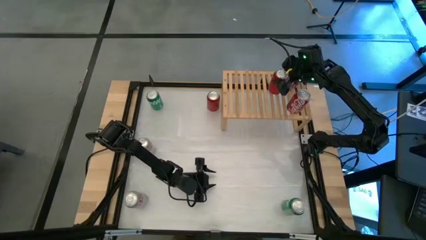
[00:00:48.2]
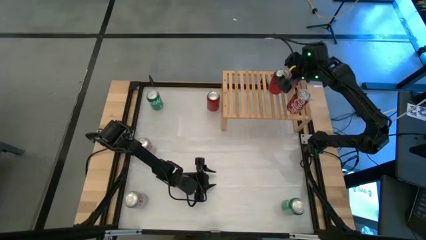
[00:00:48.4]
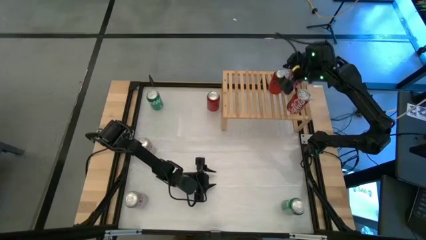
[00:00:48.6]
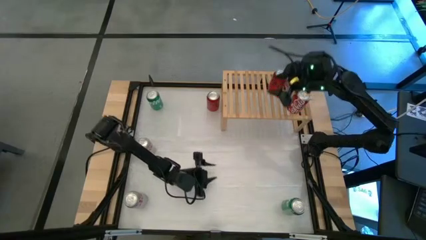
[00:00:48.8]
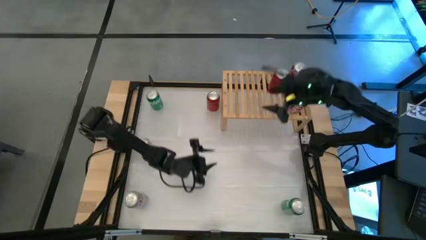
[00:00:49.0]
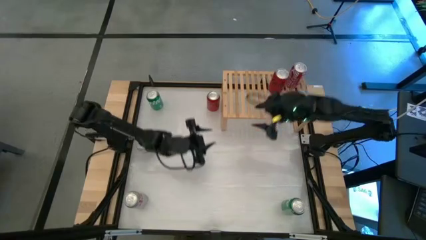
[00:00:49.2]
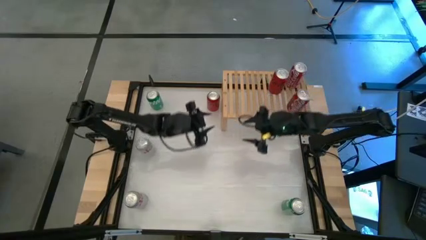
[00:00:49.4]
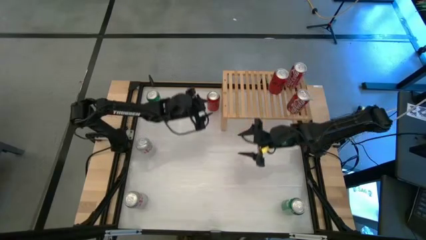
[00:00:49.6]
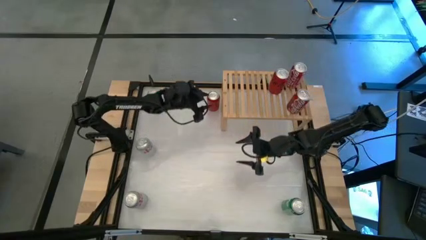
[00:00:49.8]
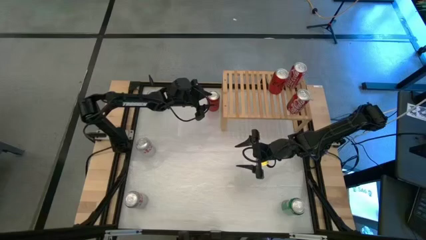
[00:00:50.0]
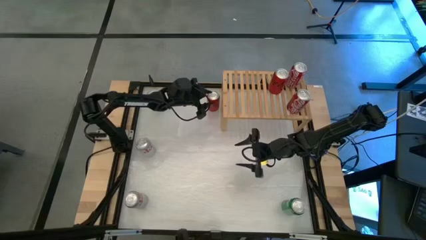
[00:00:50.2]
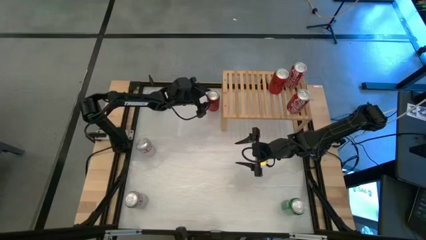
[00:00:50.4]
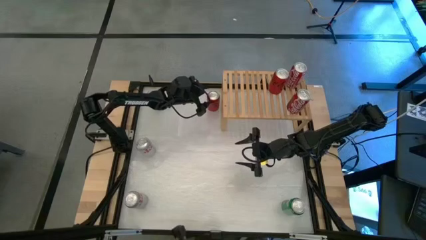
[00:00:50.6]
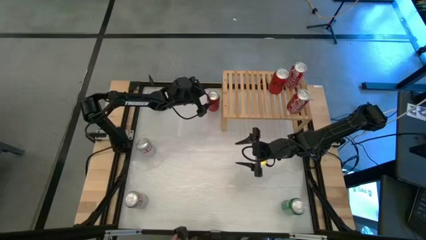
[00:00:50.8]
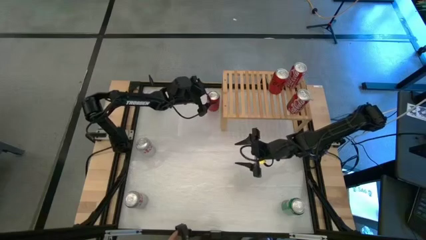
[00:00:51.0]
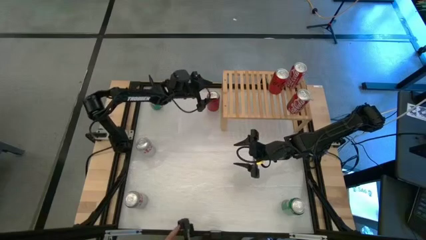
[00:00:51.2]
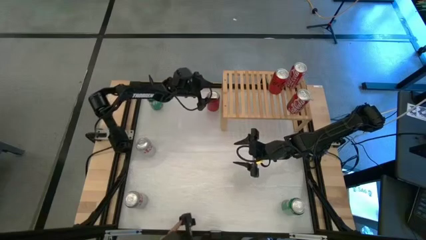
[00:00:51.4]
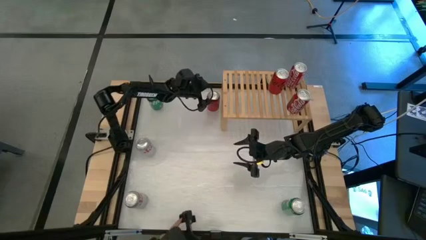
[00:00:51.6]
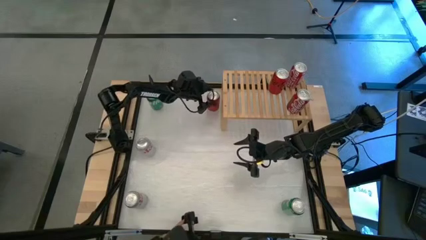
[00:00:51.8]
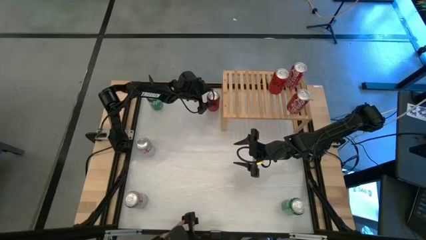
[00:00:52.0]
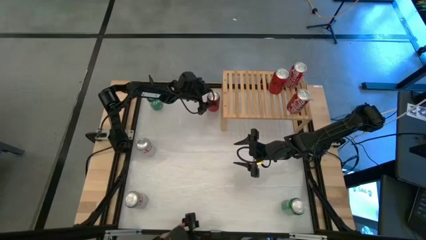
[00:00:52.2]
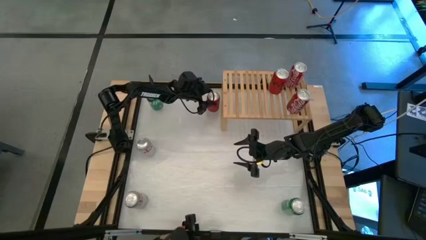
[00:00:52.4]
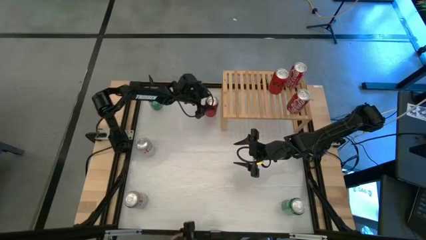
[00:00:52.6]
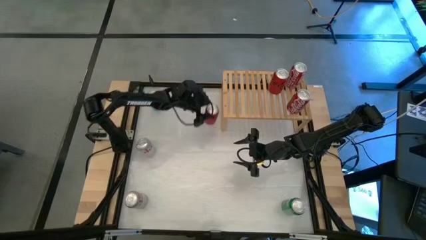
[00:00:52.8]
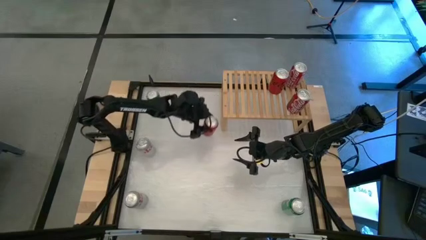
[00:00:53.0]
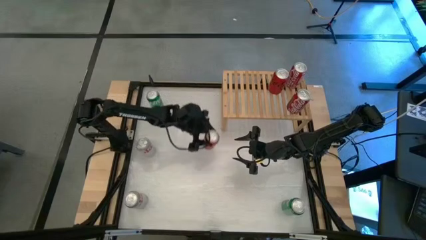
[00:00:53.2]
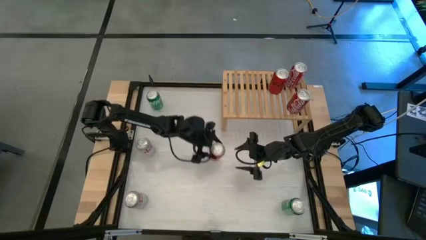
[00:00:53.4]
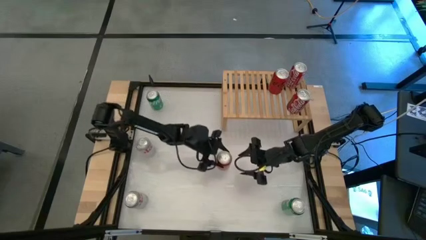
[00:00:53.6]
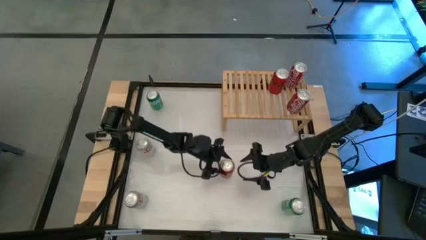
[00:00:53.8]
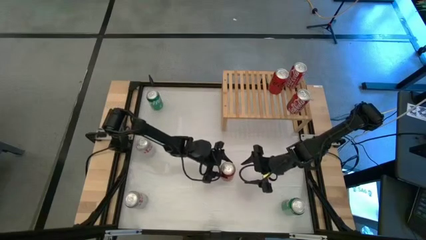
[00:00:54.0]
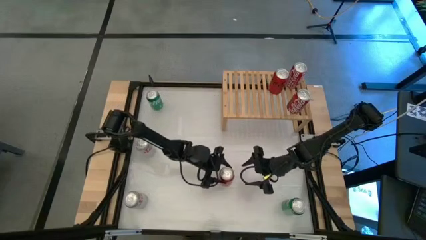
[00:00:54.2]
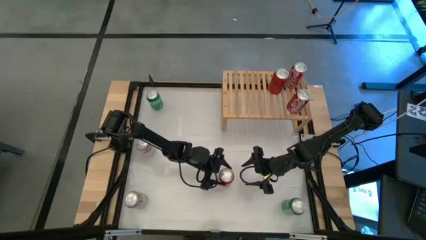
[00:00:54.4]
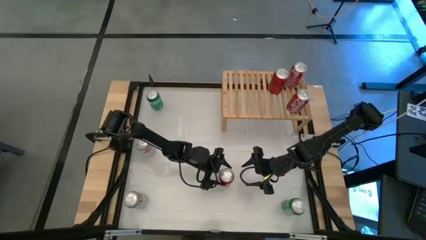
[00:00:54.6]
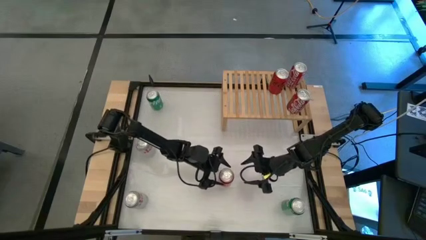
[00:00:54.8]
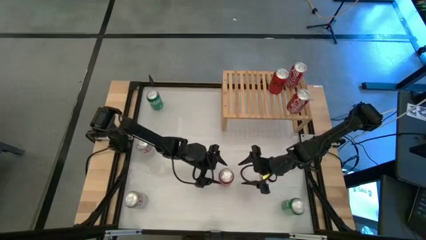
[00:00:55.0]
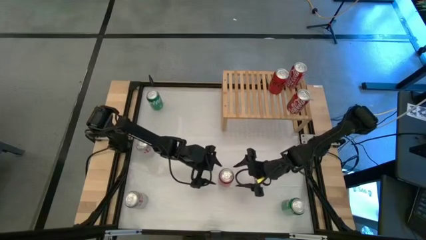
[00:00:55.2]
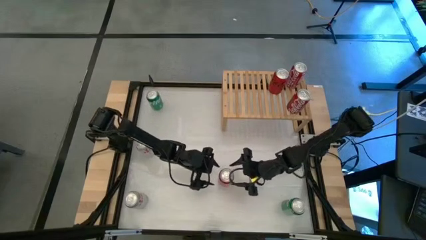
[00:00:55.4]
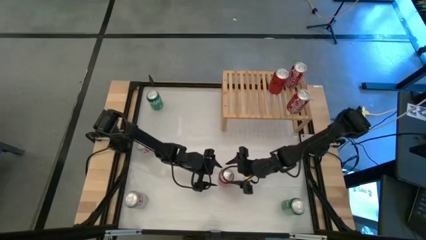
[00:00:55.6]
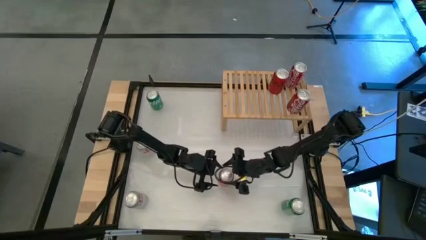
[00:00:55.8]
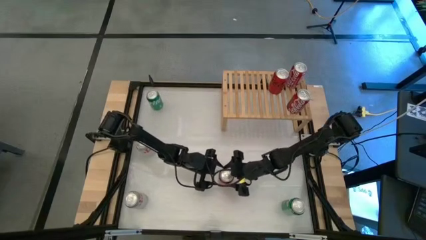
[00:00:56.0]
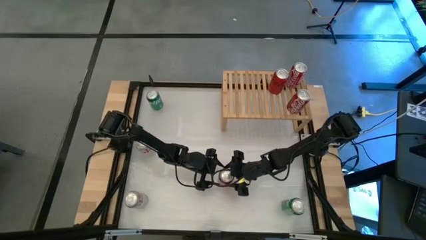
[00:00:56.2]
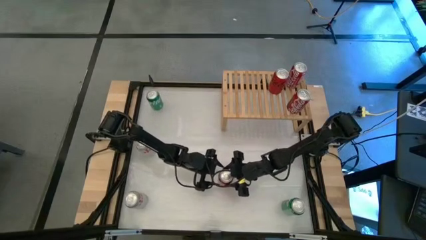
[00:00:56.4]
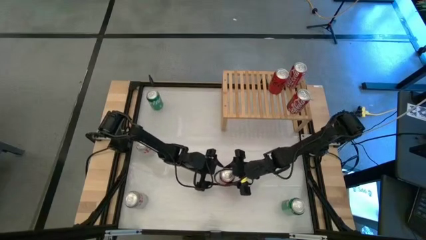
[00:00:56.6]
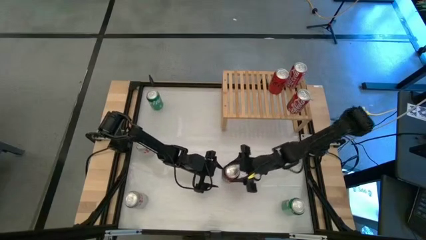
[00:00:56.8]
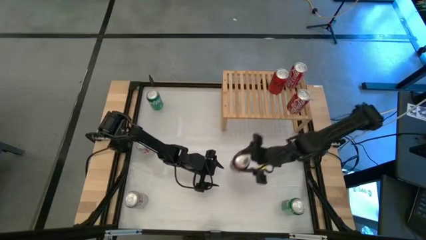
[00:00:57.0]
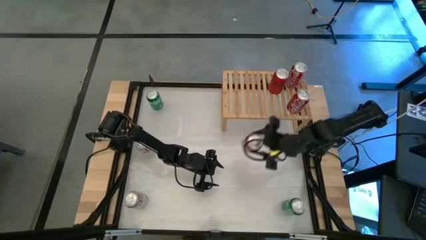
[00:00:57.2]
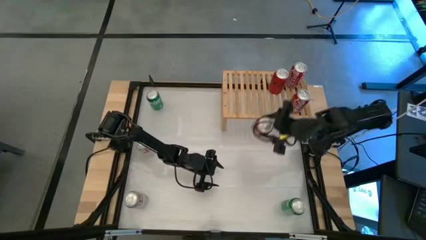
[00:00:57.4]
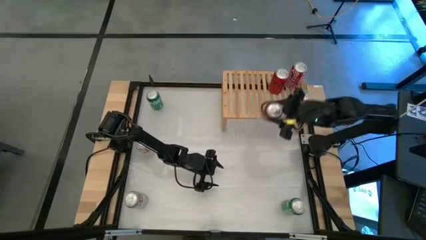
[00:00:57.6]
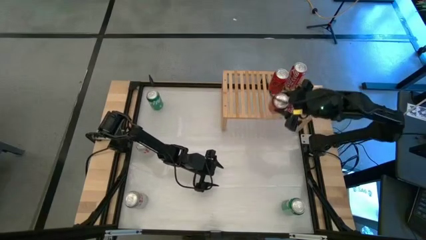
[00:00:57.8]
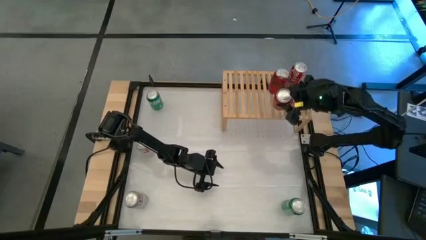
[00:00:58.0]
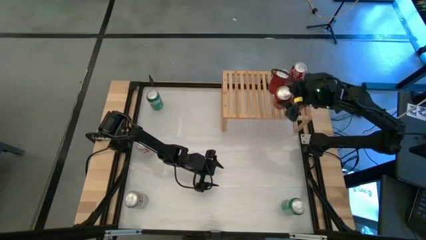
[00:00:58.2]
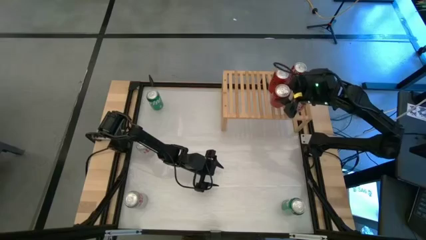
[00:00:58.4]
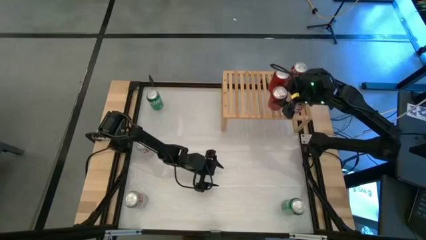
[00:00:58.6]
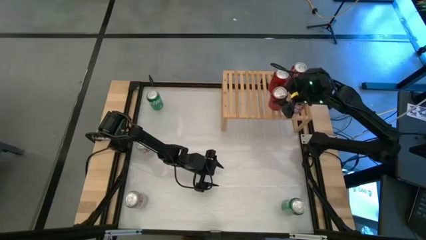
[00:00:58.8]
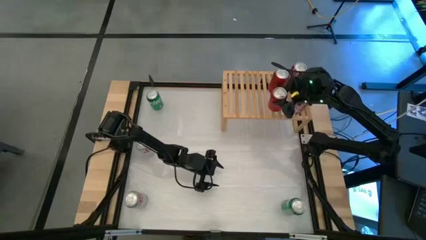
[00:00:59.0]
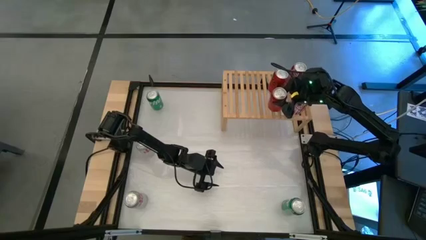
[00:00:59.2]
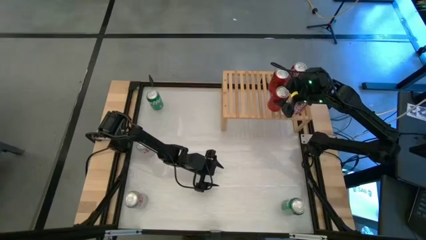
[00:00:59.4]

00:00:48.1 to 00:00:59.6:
Task: Place canned beverage on shelf
Put the red black soda can on the shelf aligned with the other red black soda can
